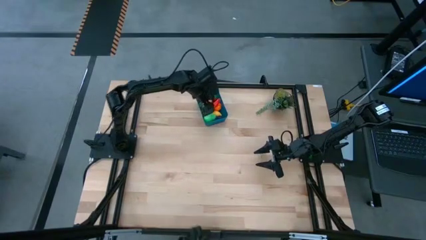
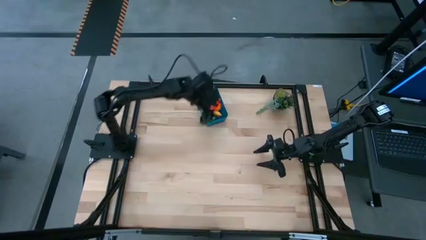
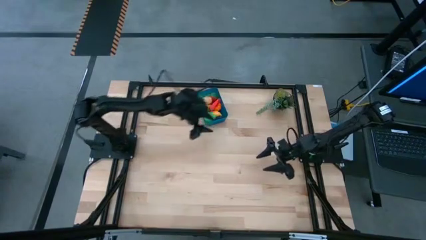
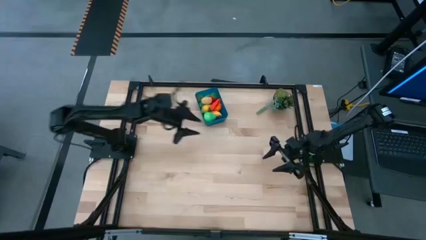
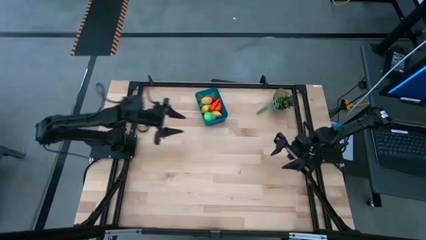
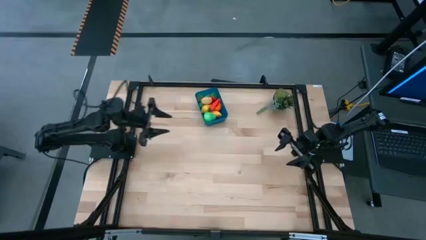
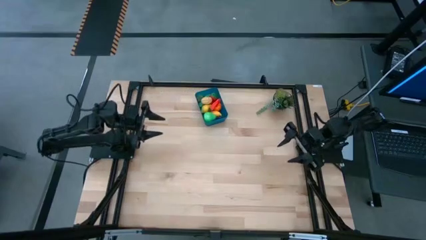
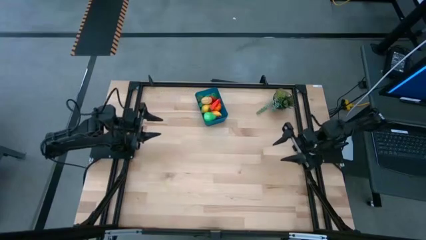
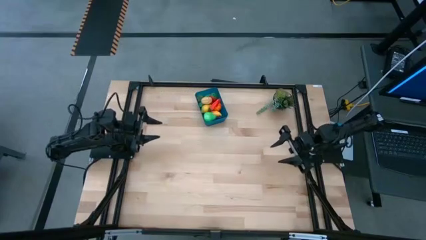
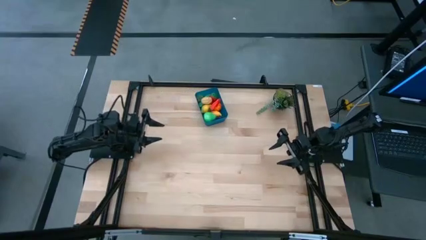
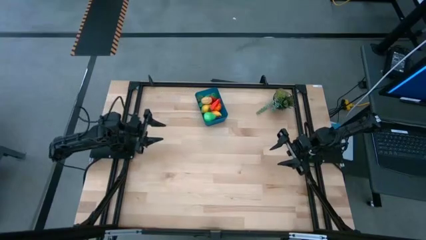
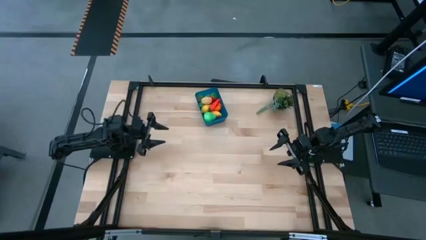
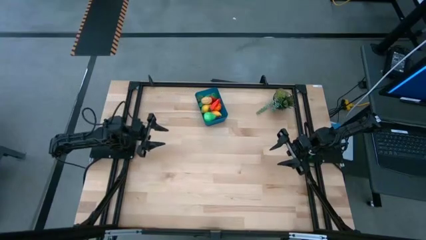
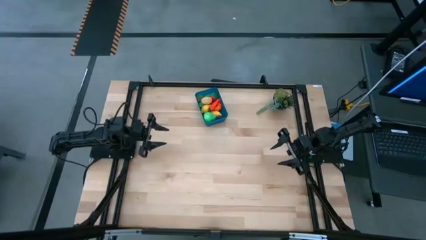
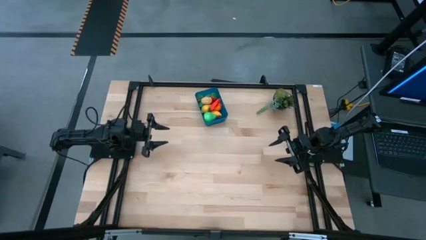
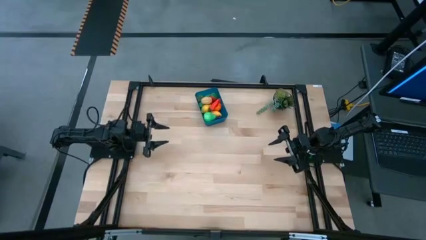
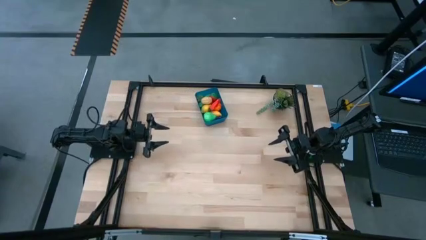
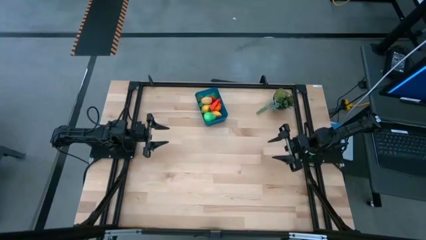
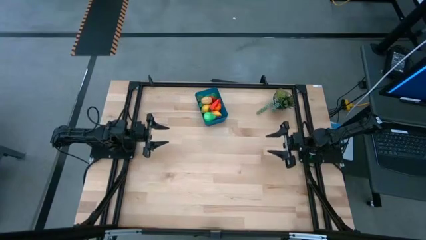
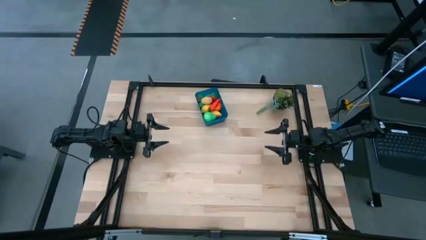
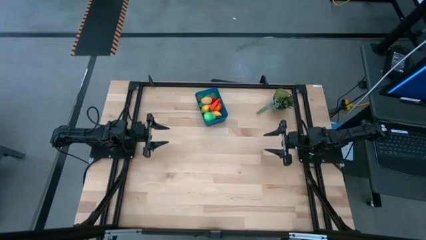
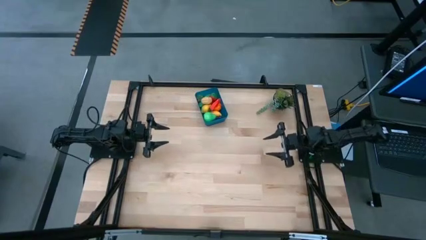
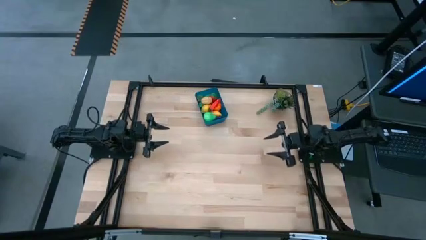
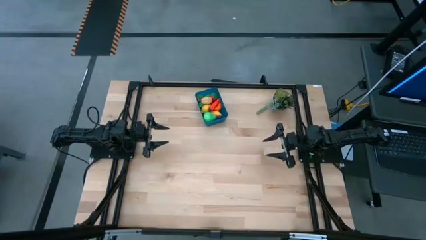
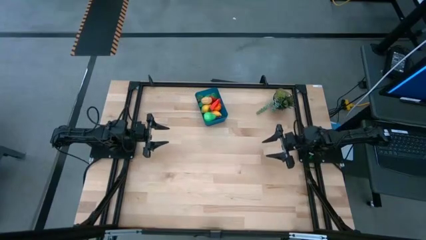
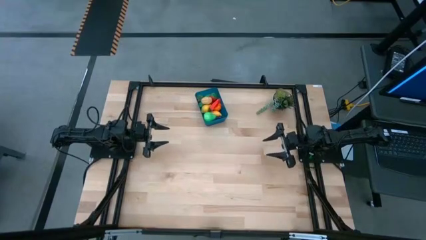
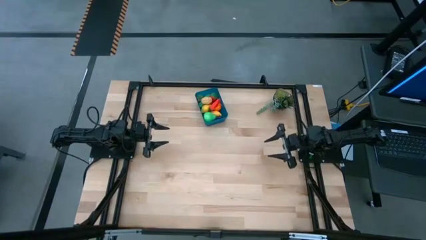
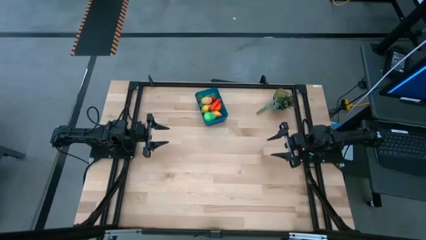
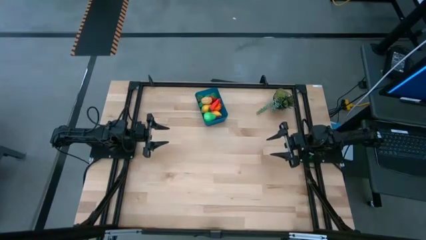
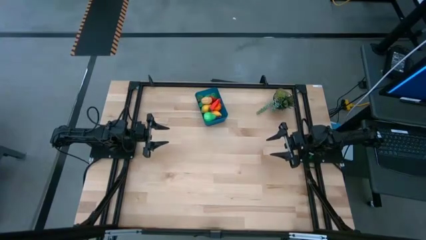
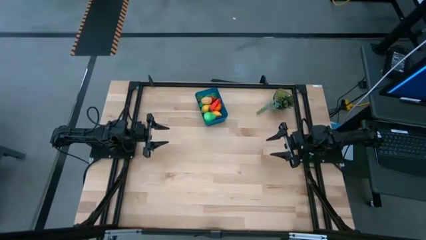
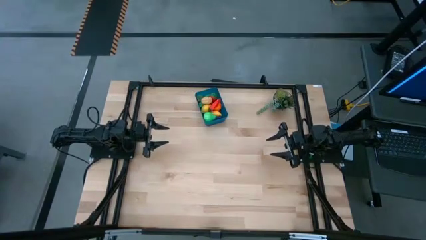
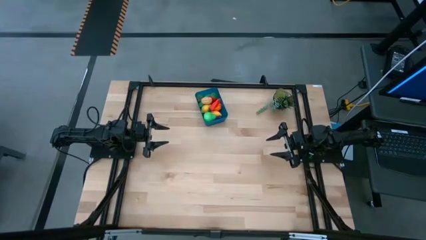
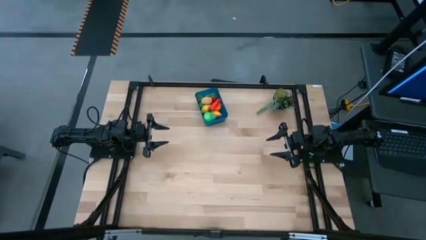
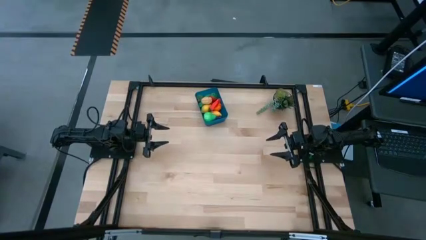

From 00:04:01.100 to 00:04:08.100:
Task: Pick and placing Produce into tupperware
Return to Home Position

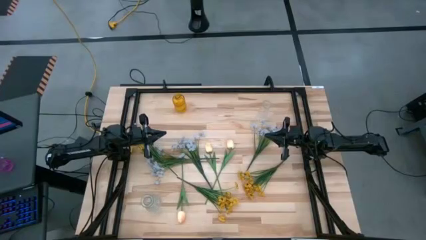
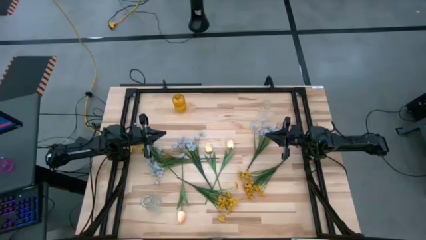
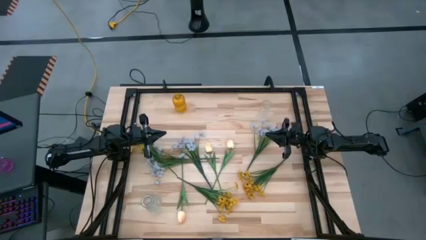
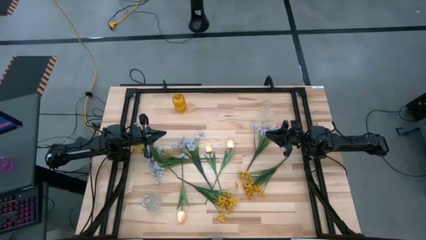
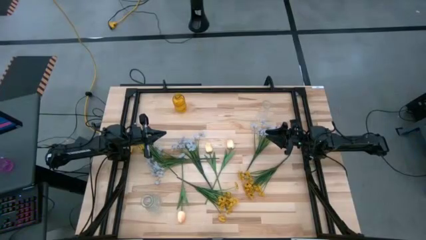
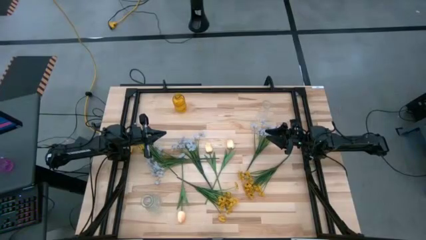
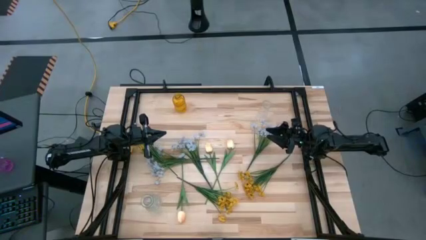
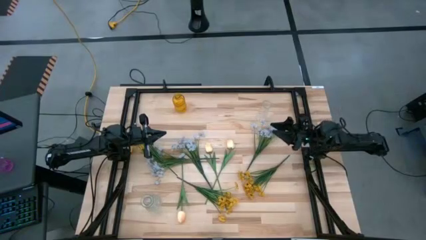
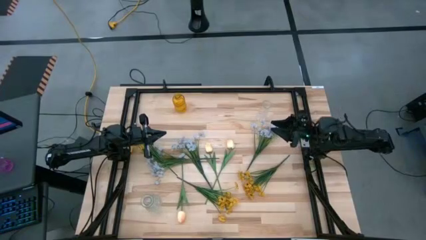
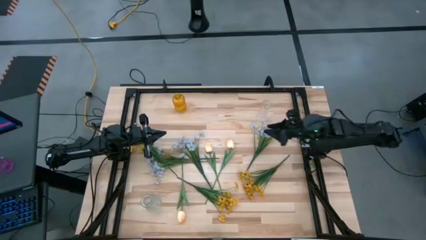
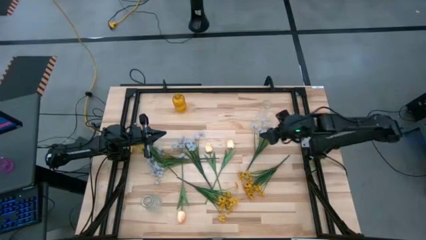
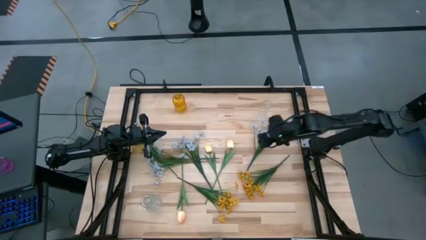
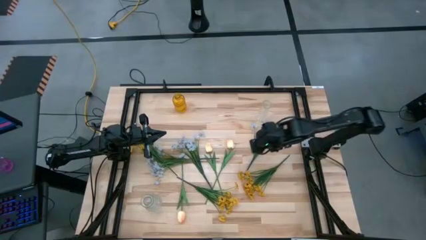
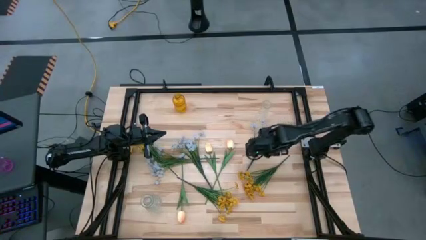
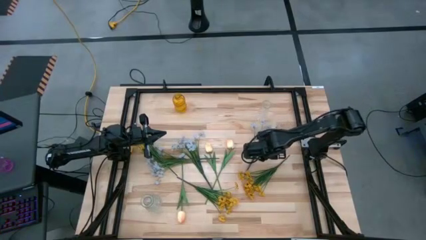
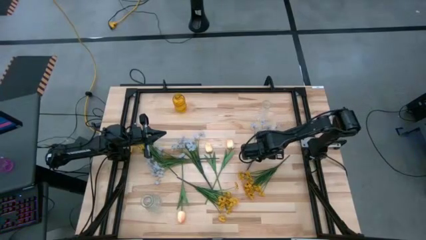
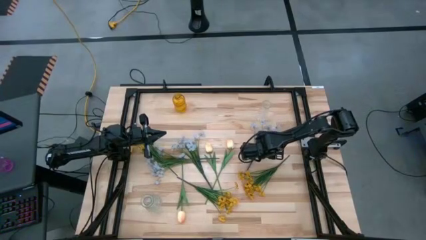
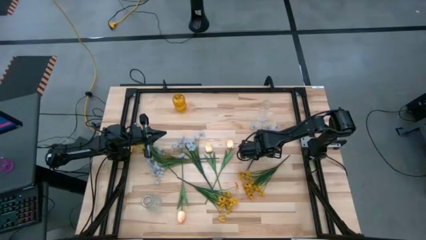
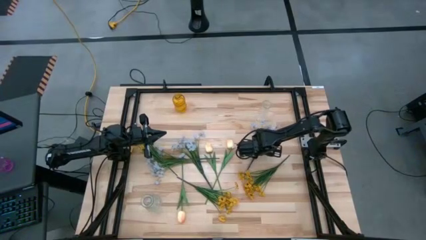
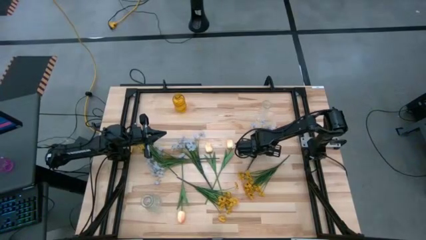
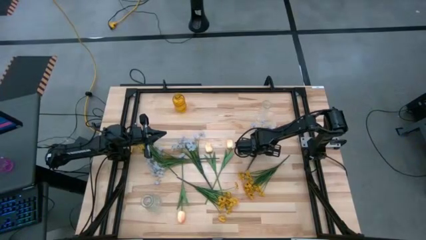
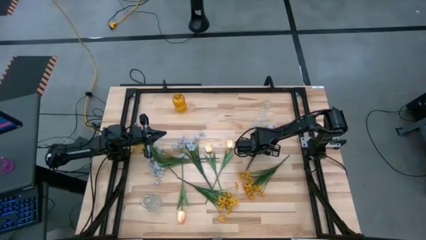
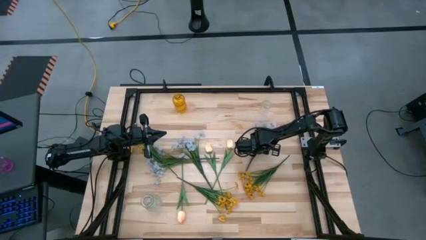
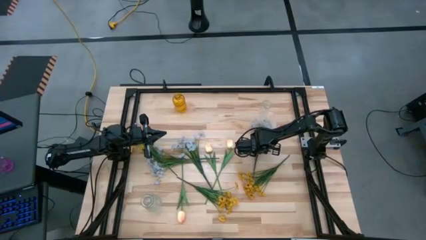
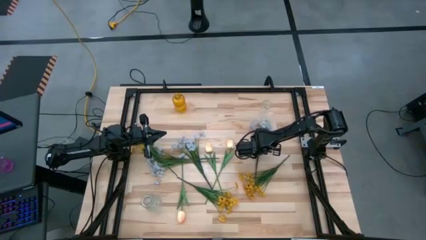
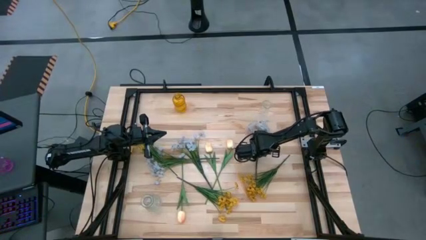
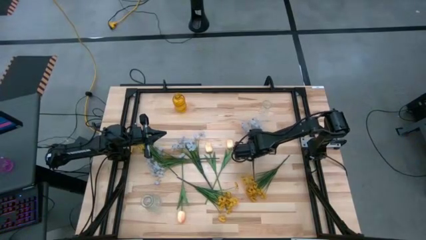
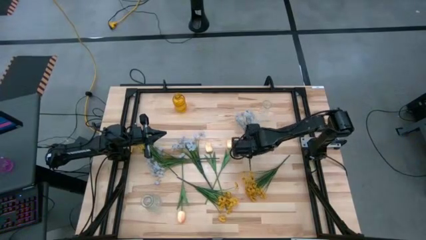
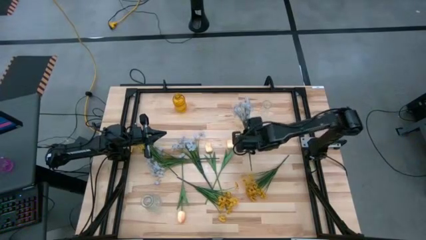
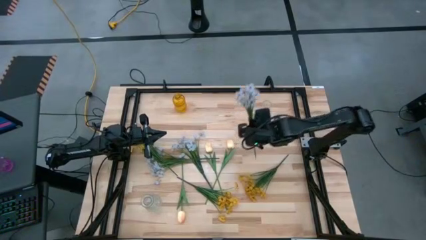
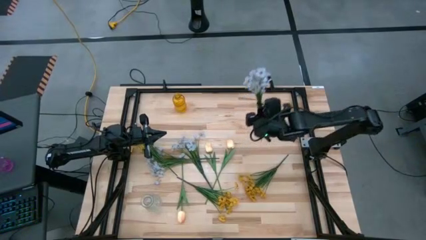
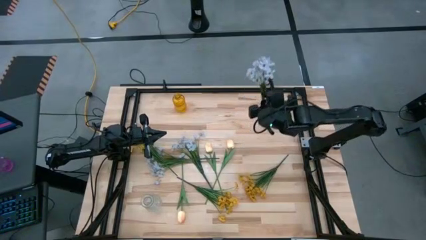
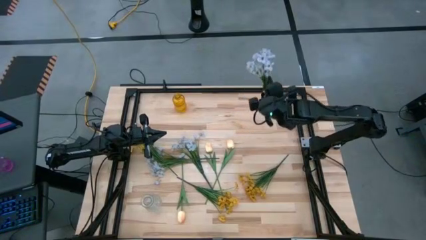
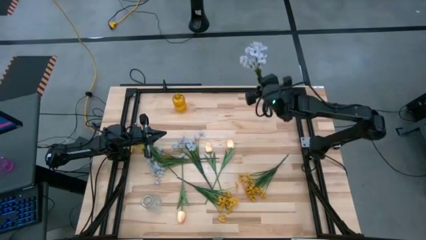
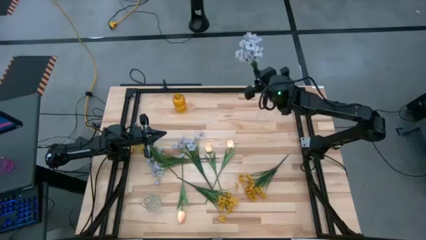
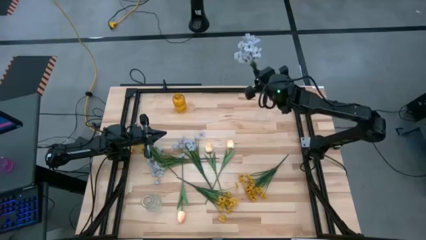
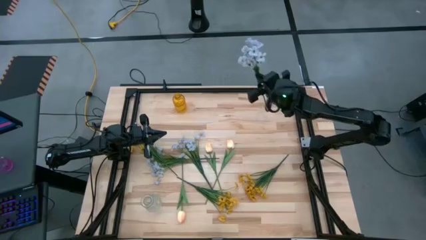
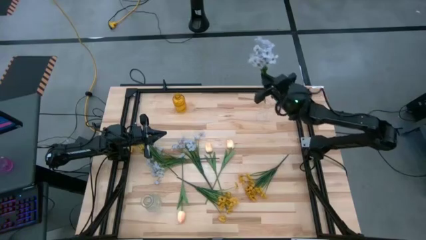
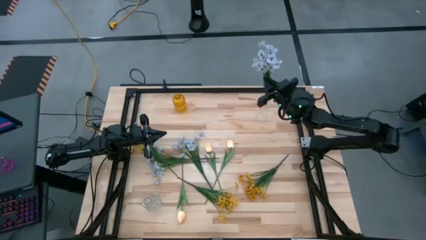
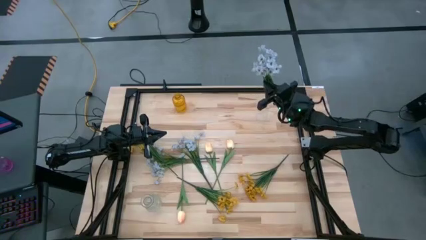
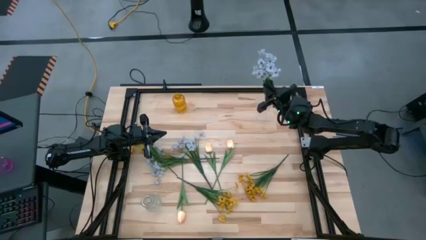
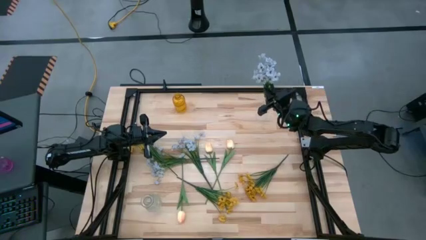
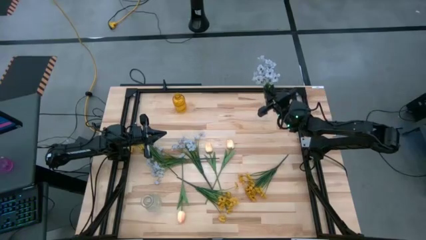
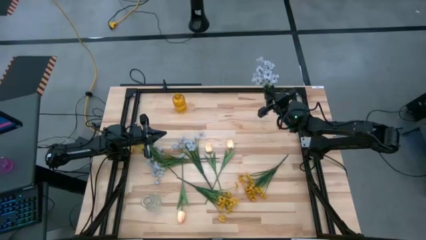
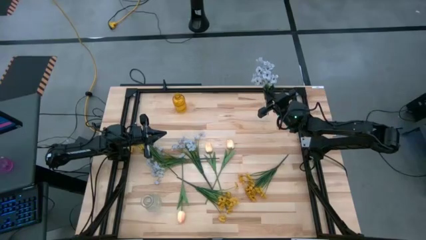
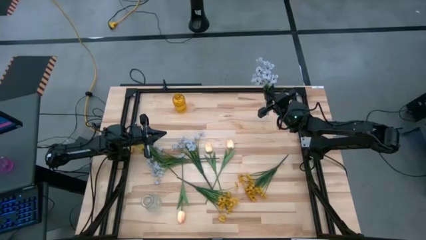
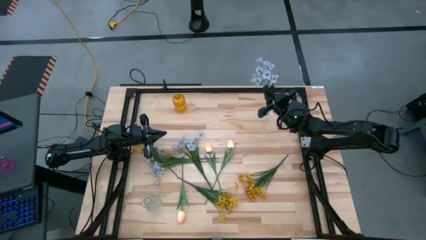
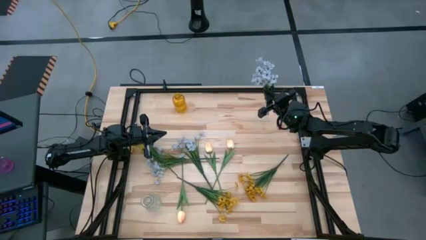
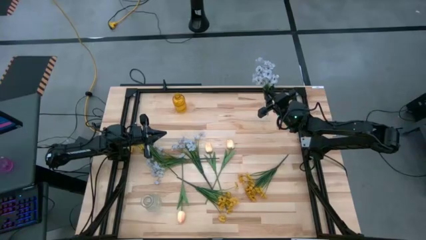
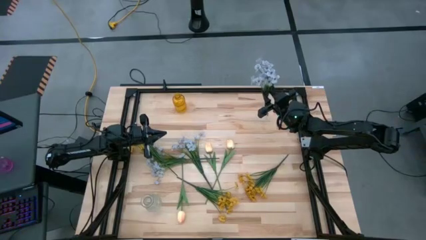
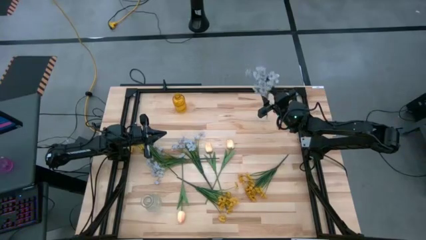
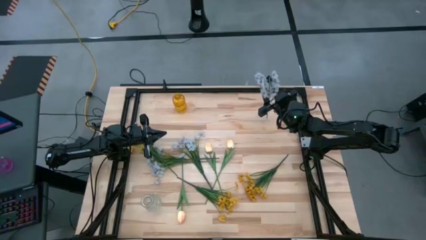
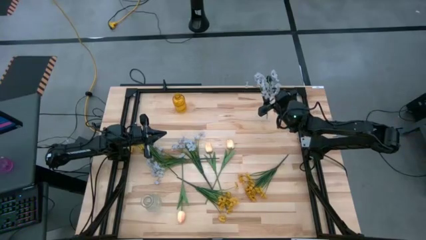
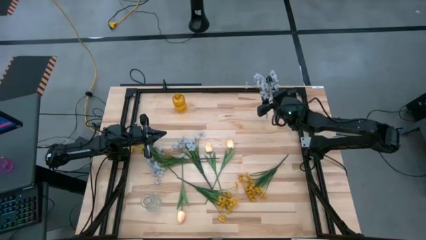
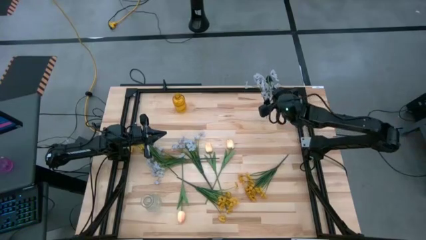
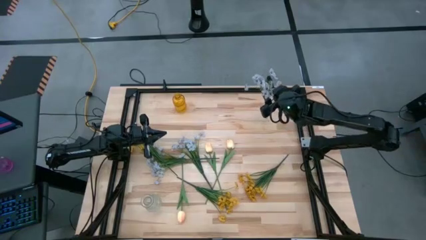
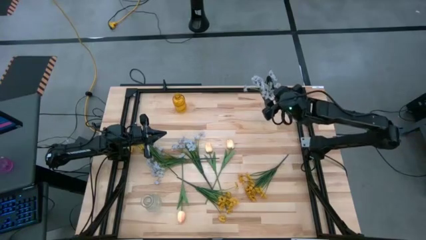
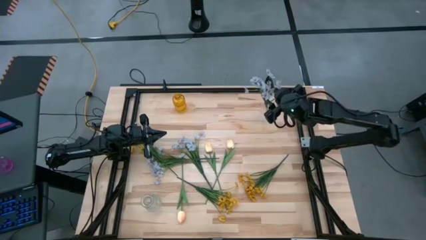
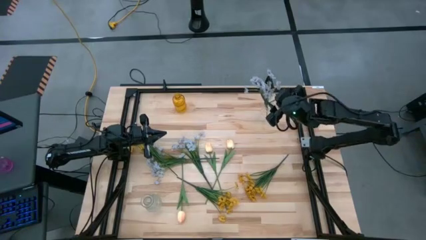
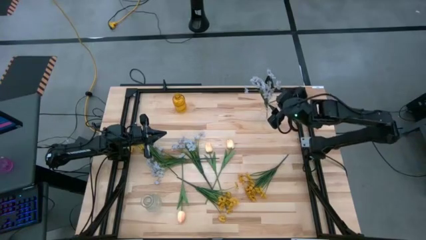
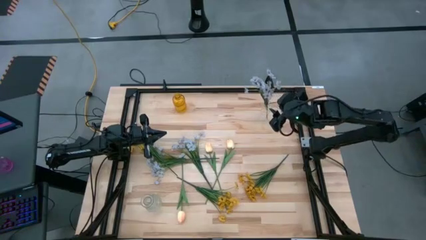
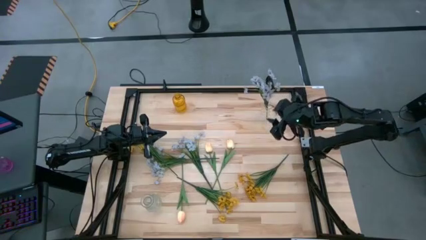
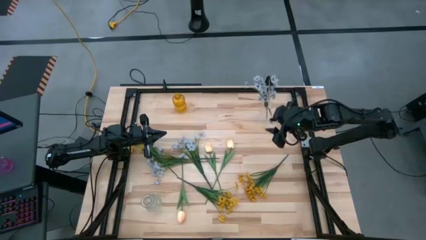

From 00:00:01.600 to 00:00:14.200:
Task: Sort flowers into vase by color
Put the top white flowers into the top transparent vase
